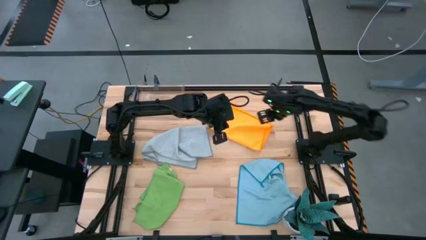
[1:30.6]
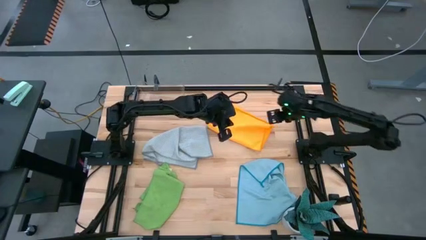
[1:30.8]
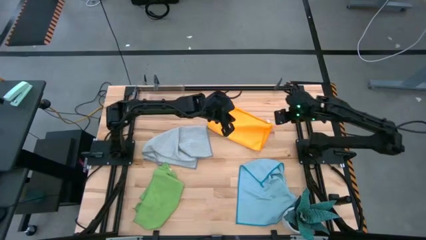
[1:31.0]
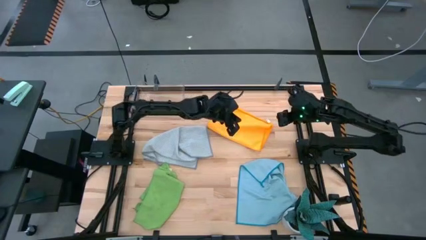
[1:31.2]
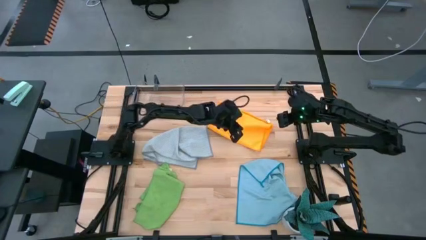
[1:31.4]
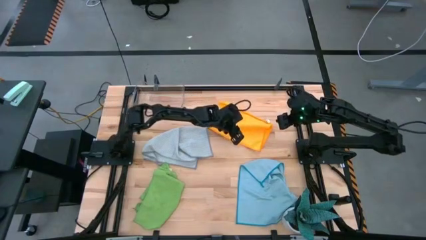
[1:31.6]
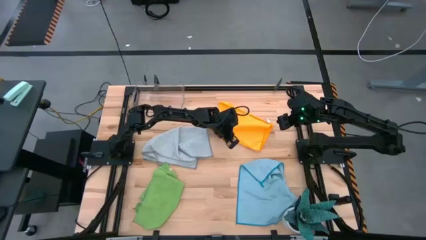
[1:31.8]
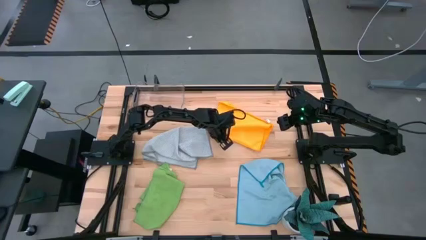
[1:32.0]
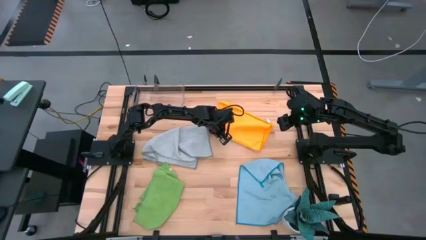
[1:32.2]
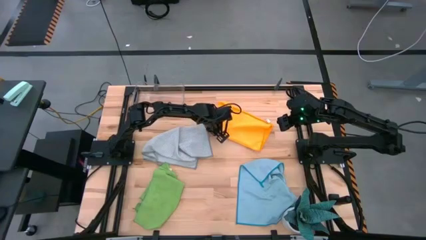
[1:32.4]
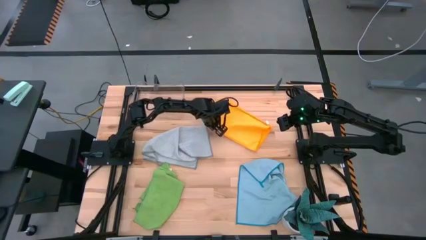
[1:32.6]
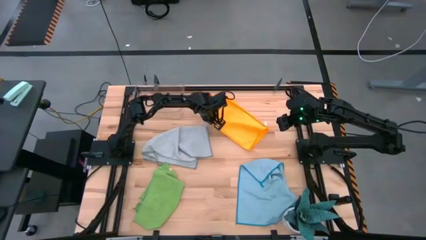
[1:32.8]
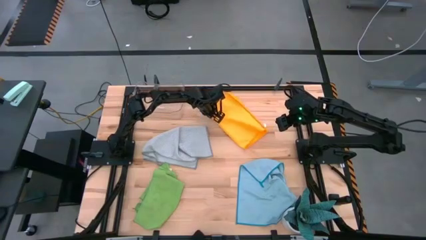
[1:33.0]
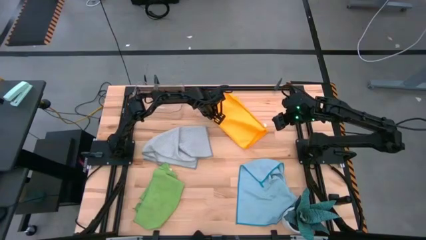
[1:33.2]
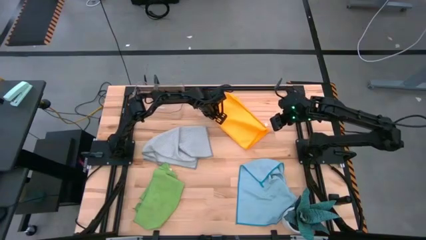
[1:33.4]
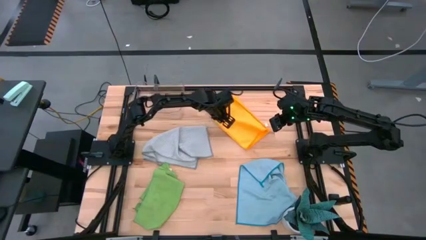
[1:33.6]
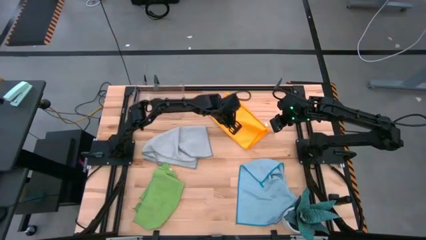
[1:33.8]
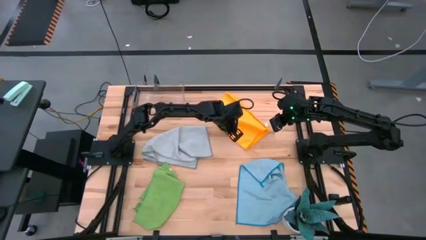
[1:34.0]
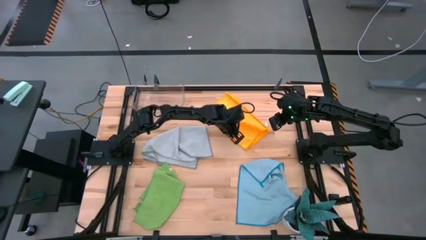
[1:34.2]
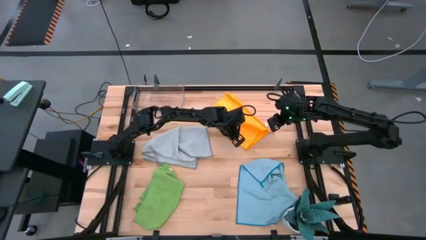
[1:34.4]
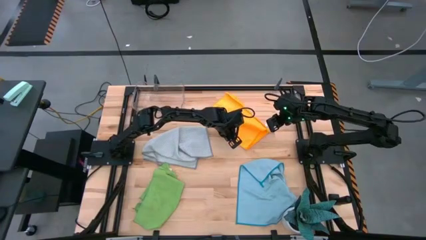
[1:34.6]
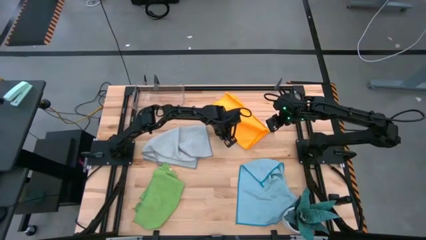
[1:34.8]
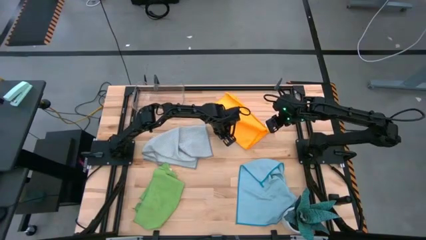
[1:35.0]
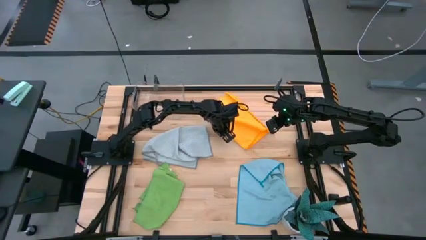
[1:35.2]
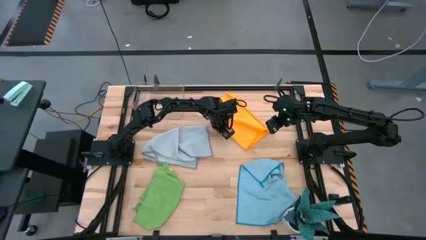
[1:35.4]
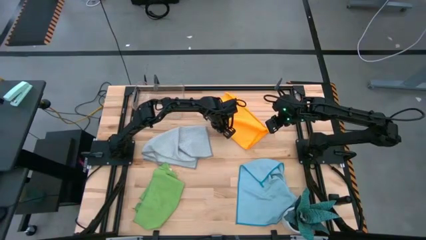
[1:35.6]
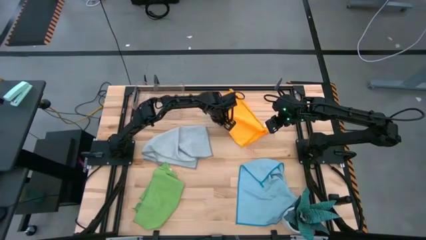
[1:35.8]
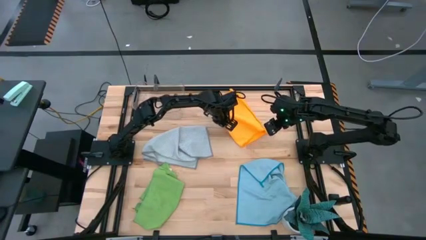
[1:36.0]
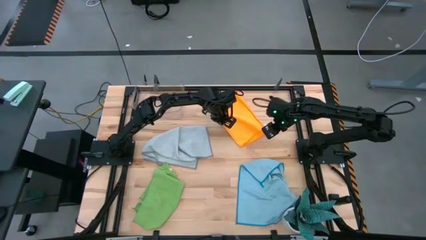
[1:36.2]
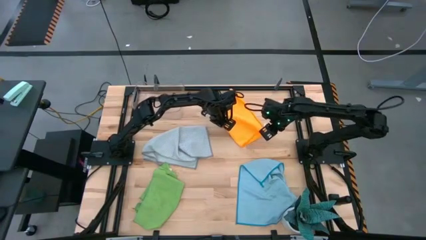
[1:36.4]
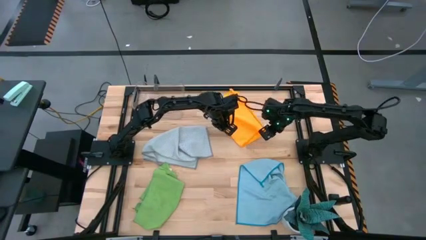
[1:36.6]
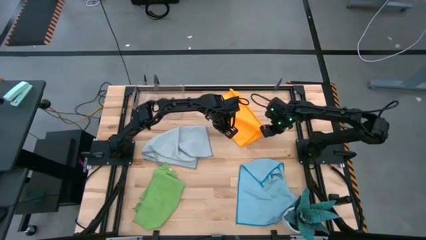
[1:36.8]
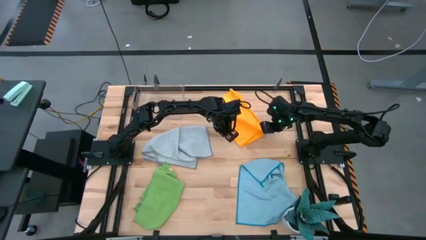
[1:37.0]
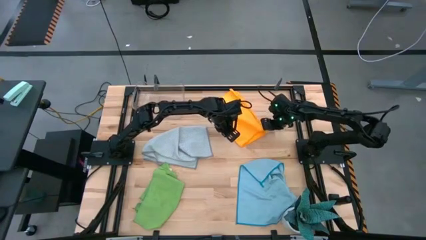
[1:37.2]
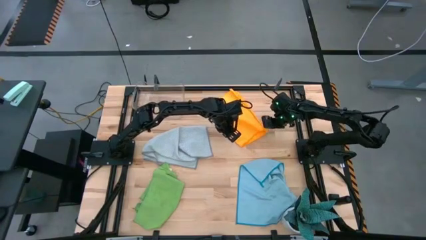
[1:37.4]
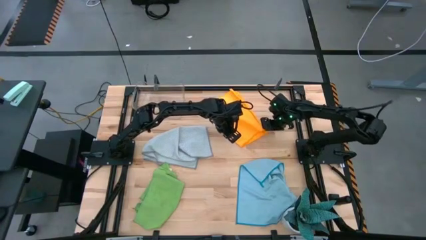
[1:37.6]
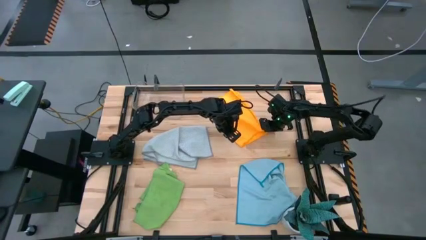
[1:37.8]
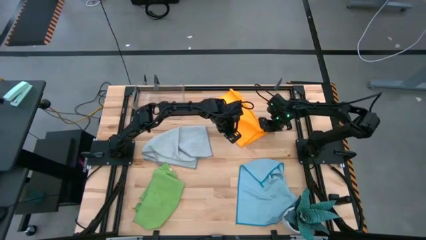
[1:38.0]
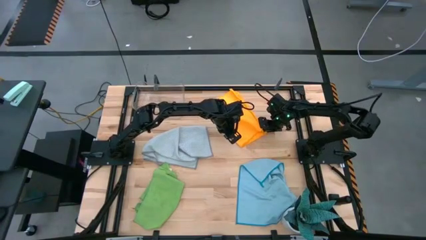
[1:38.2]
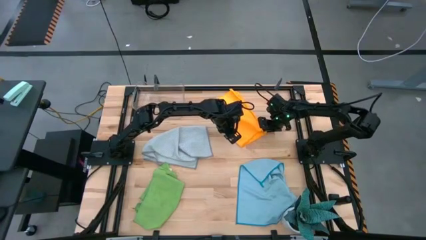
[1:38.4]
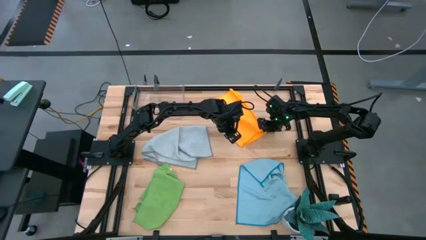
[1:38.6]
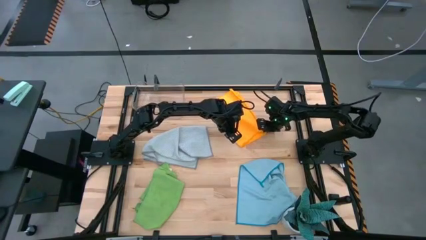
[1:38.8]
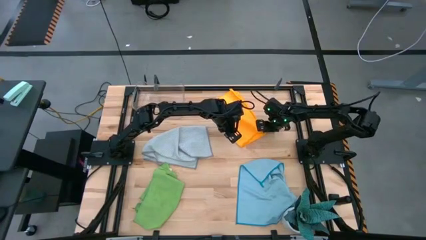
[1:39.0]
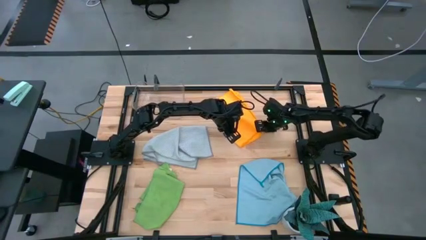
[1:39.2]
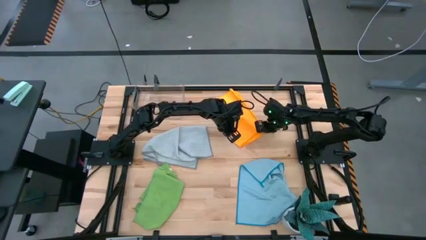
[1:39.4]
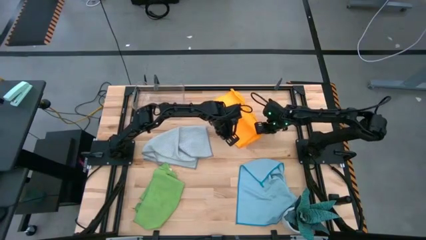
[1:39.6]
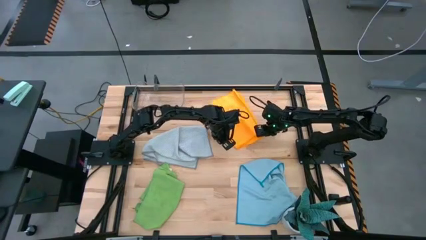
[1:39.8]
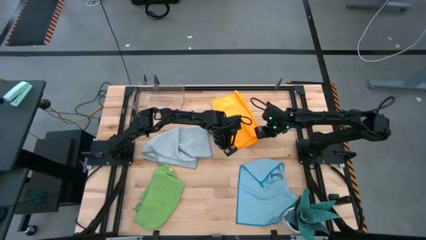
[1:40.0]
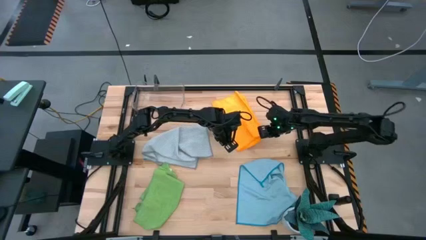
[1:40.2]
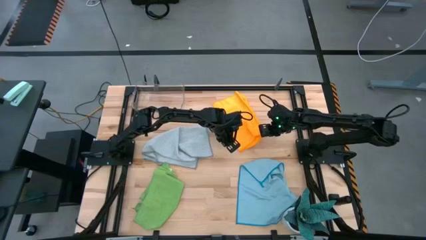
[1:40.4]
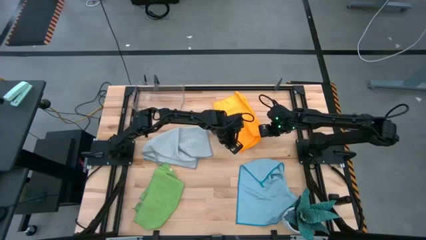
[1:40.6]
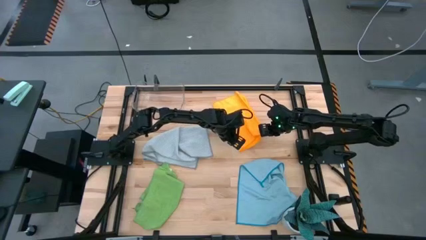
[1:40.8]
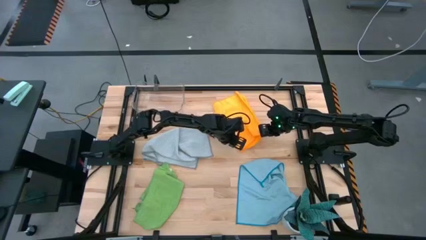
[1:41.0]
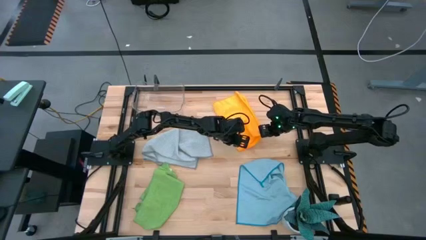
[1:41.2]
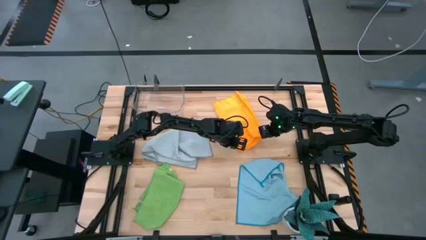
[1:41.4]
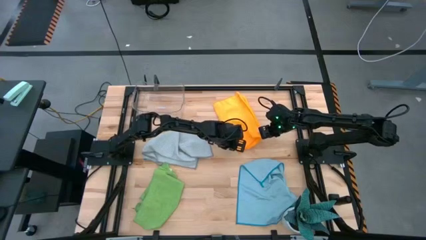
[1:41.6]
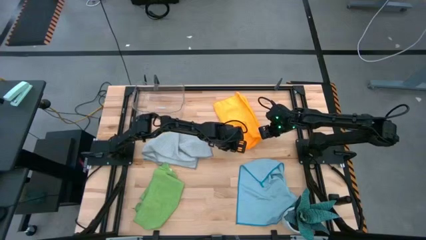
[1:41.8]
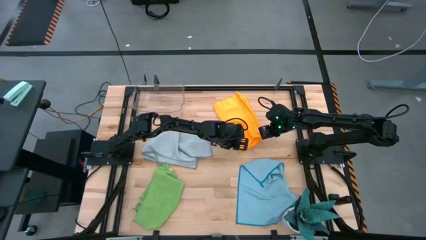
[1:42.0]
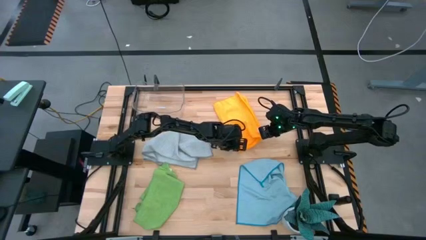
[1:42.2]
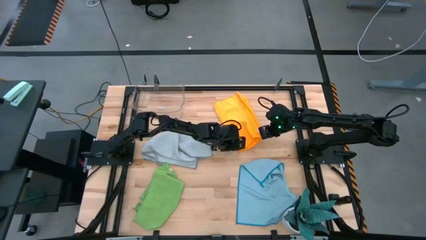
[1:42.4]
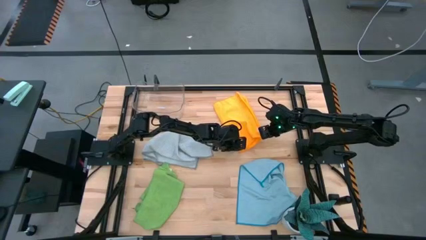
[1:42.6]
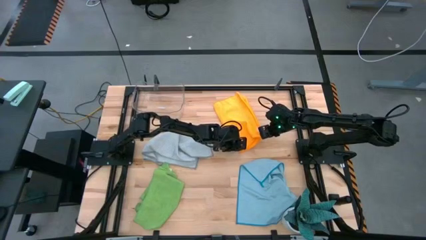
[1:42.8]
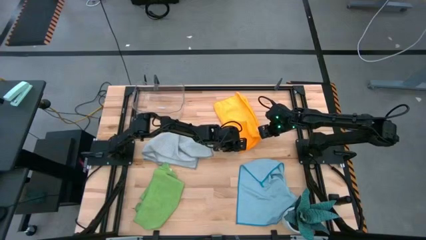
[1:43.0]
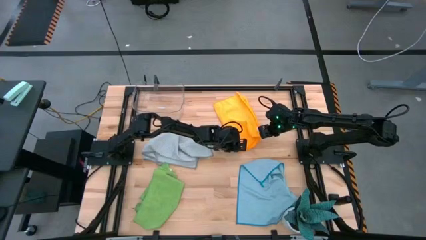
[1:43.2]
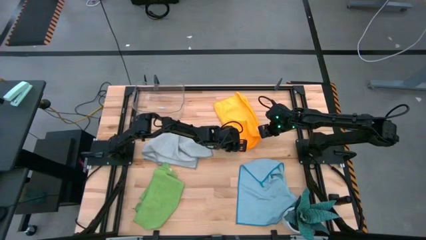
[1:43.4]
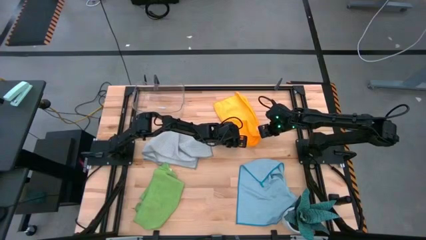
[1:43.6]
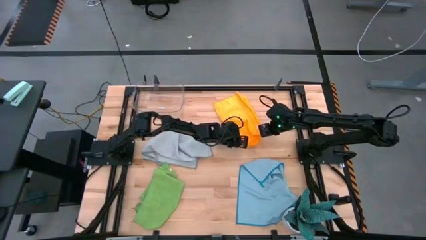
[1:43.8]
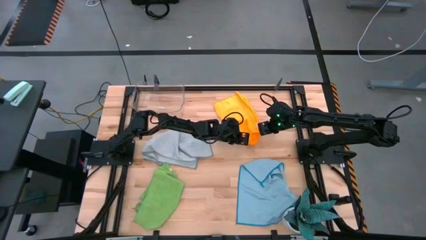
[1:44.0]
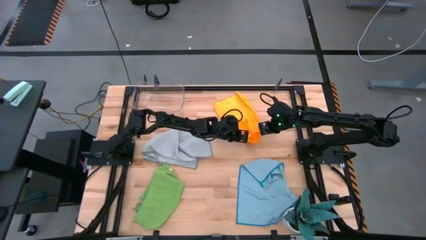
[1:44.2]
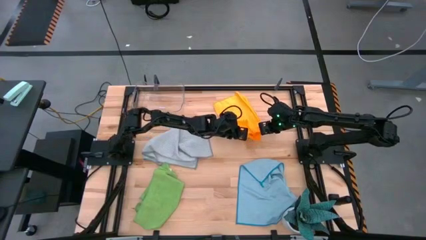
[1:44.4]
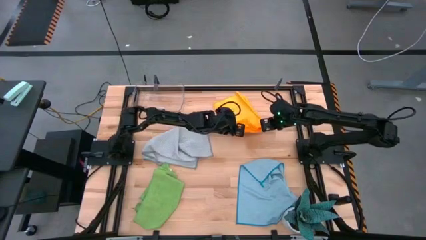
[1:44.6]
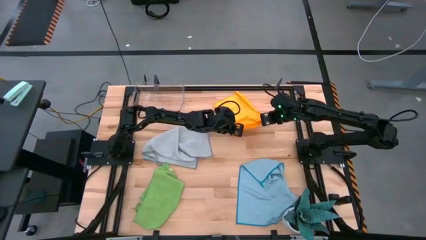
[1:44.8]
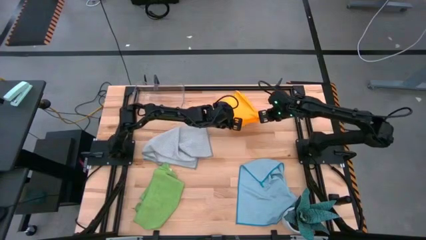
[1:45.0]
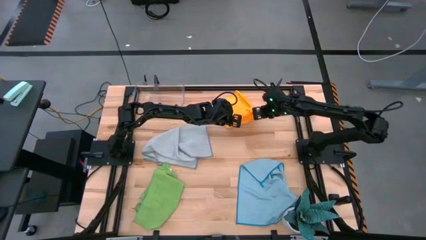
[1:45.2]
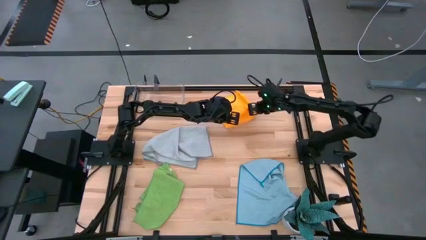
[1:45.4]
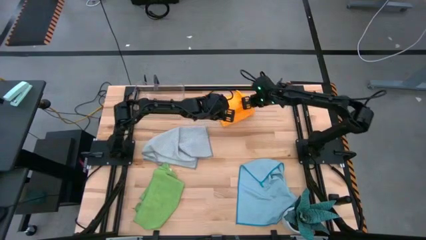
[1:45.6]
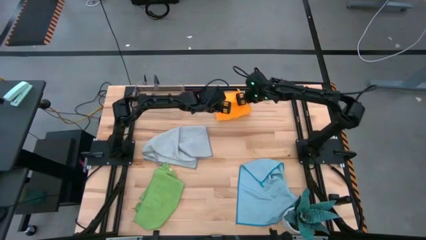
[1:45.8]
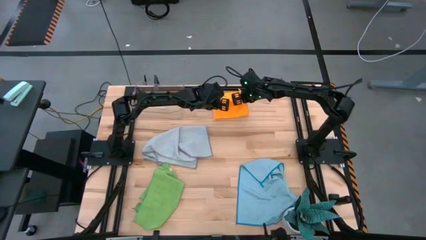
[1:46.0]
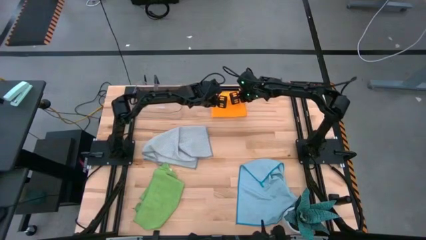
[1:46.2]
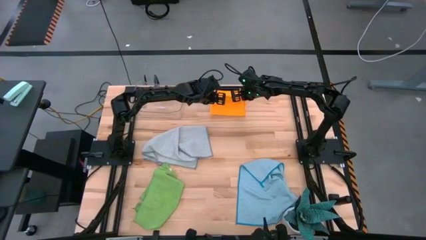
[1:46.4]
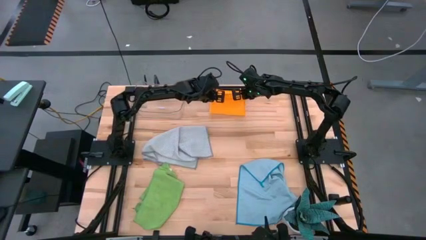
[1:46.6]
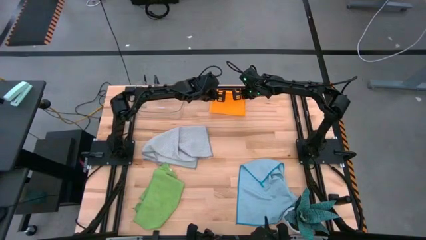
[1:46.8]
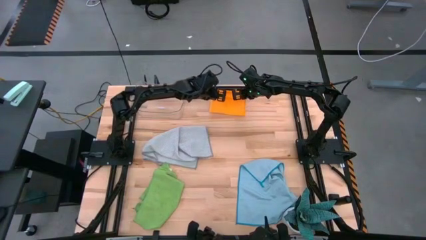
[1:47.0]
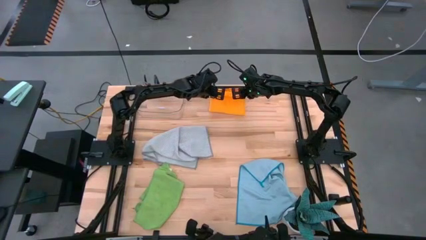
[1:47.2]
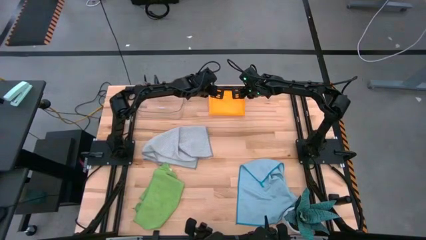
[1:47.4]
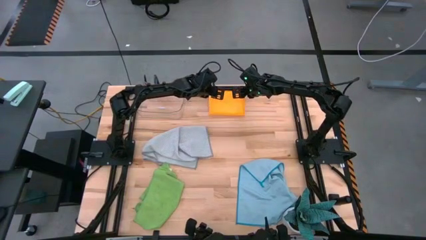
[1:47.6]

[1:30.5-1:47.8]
Task: Fold microfiber towels
Fold the orange microfiber cloth
